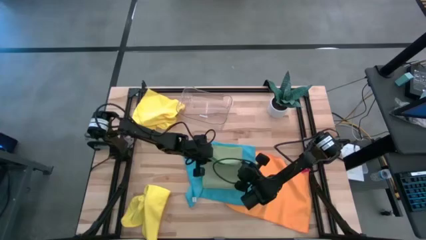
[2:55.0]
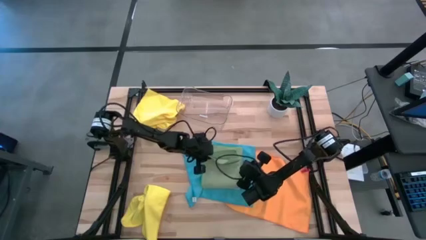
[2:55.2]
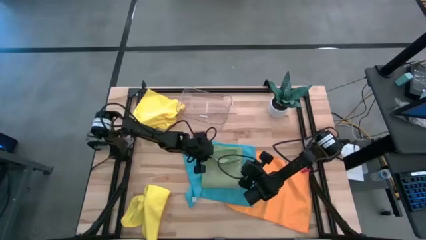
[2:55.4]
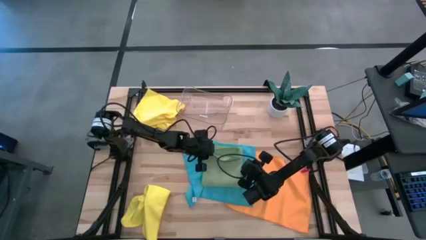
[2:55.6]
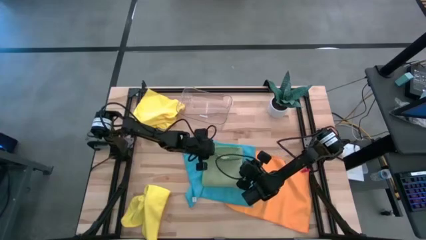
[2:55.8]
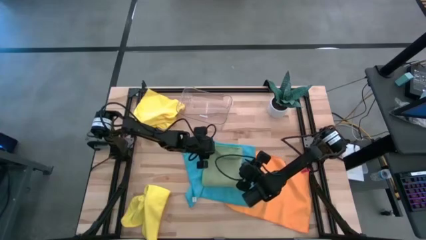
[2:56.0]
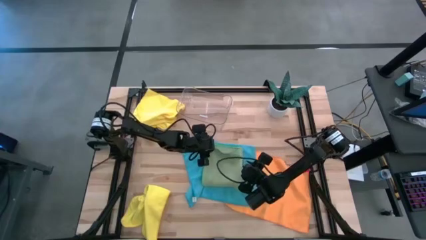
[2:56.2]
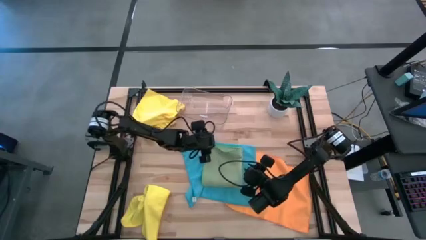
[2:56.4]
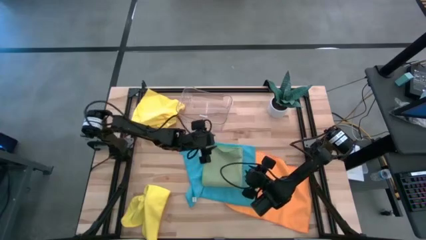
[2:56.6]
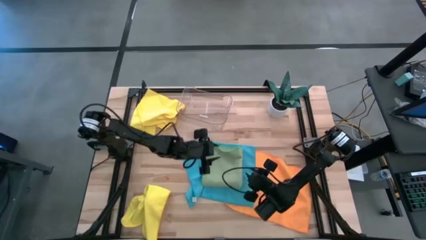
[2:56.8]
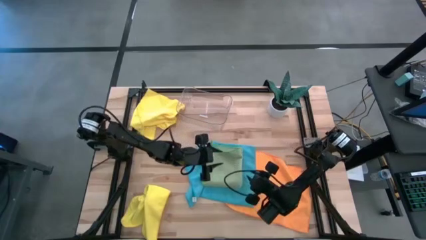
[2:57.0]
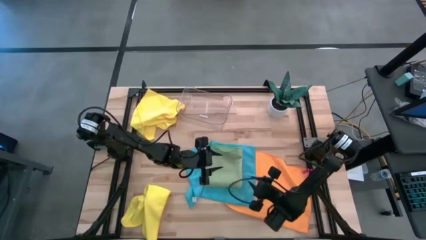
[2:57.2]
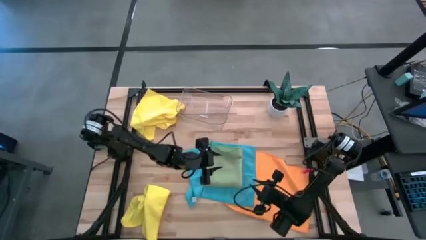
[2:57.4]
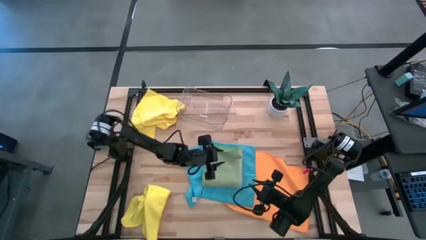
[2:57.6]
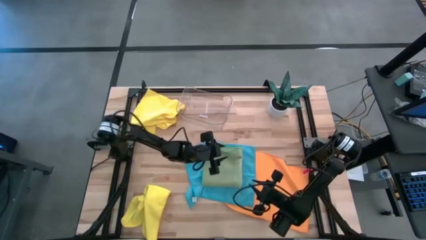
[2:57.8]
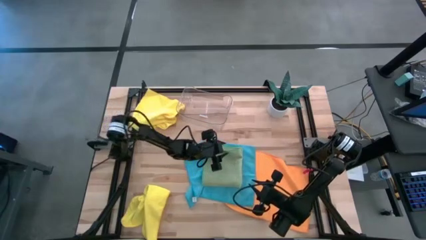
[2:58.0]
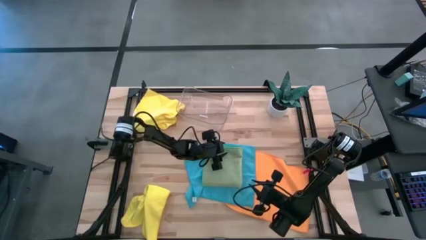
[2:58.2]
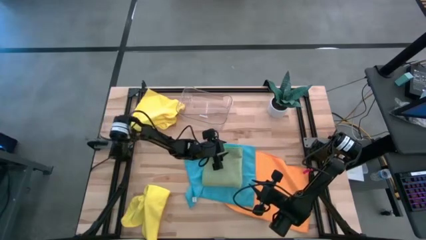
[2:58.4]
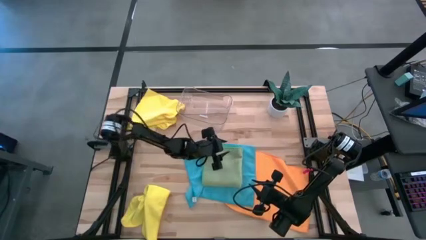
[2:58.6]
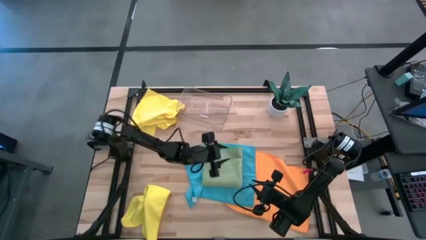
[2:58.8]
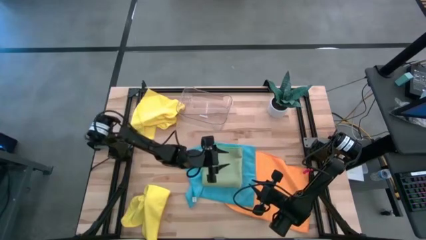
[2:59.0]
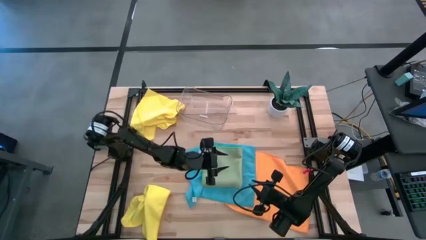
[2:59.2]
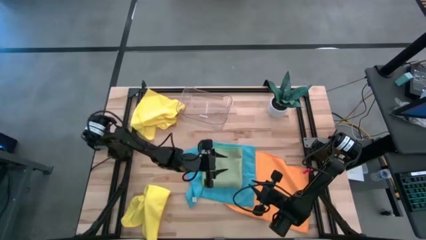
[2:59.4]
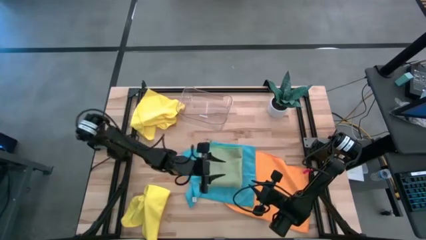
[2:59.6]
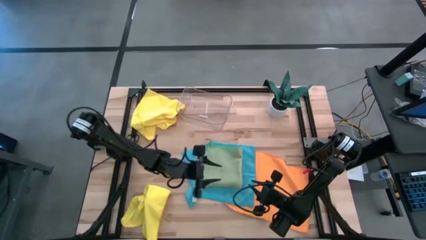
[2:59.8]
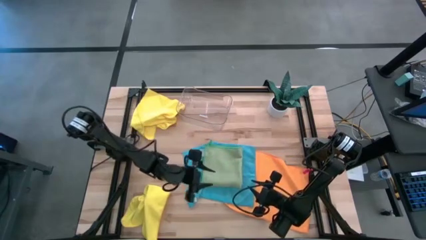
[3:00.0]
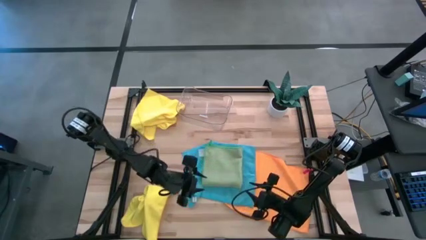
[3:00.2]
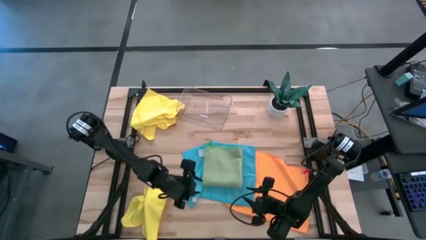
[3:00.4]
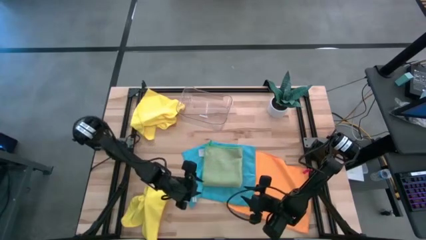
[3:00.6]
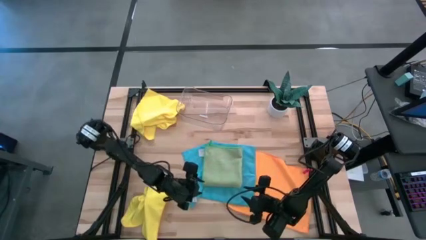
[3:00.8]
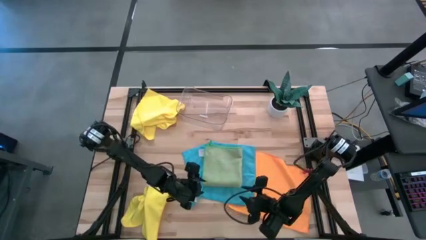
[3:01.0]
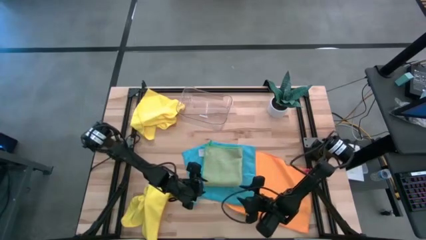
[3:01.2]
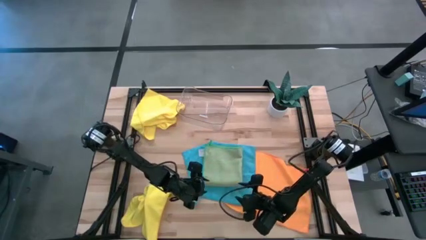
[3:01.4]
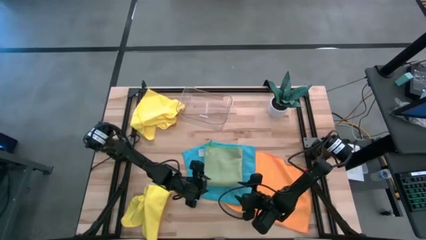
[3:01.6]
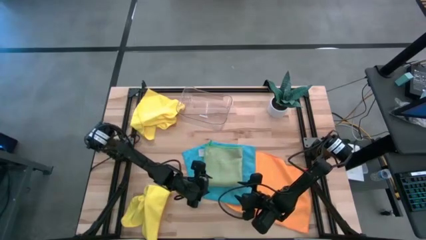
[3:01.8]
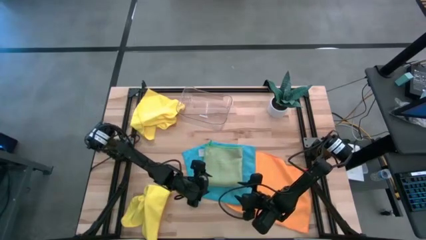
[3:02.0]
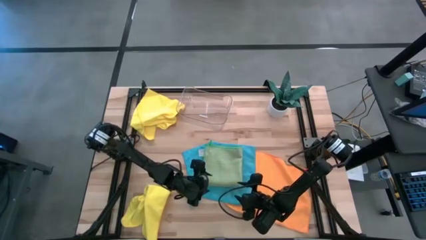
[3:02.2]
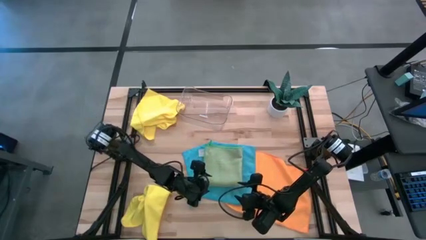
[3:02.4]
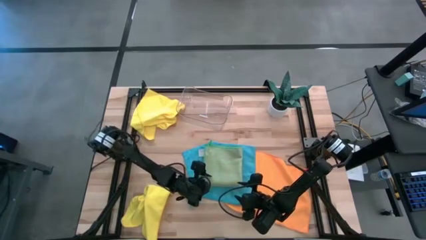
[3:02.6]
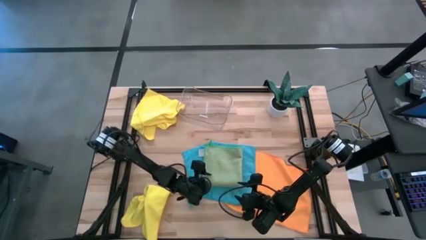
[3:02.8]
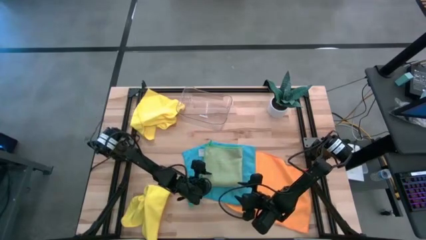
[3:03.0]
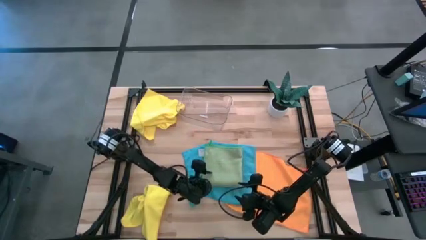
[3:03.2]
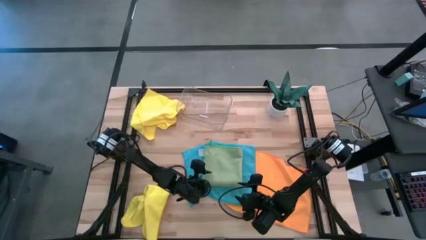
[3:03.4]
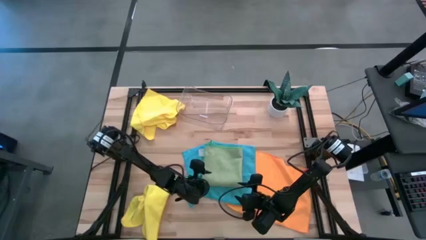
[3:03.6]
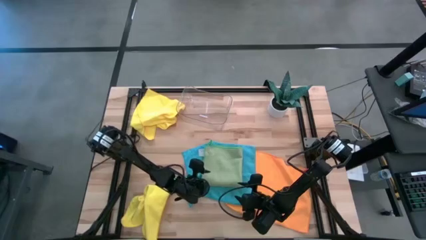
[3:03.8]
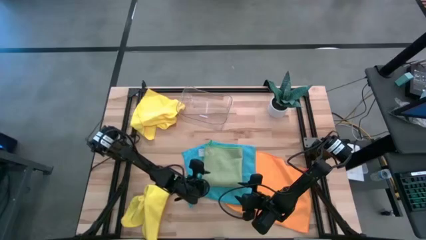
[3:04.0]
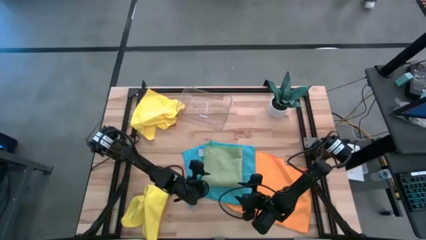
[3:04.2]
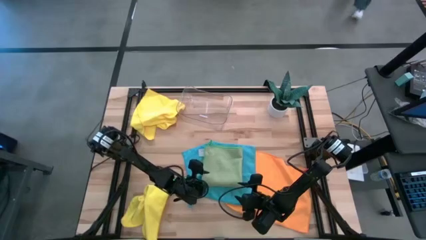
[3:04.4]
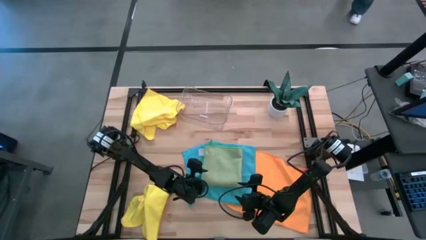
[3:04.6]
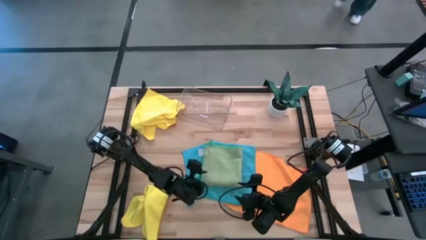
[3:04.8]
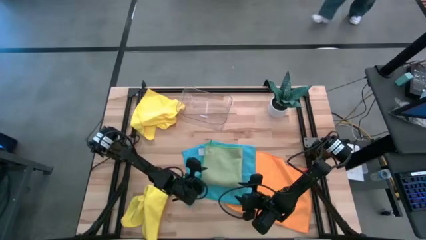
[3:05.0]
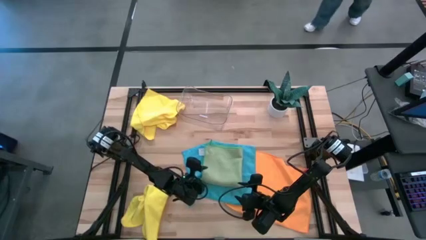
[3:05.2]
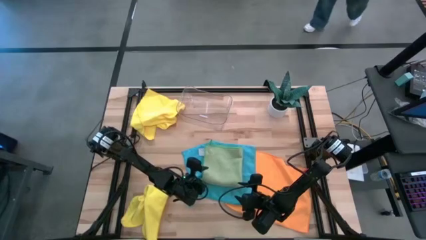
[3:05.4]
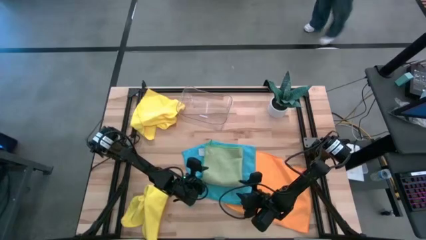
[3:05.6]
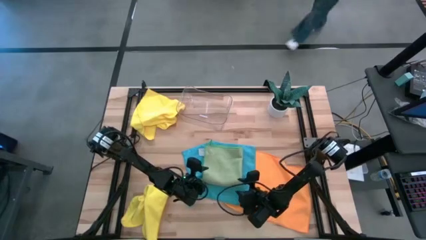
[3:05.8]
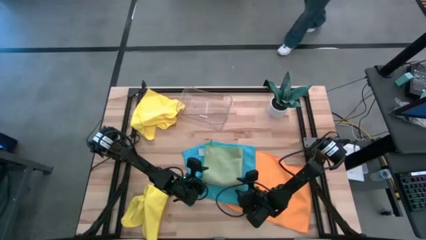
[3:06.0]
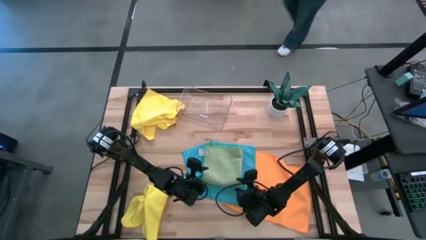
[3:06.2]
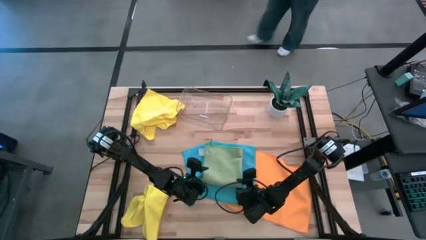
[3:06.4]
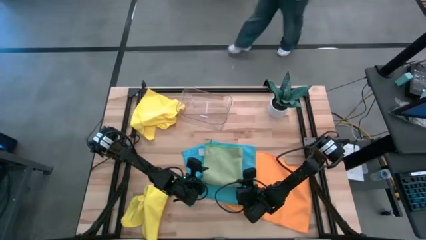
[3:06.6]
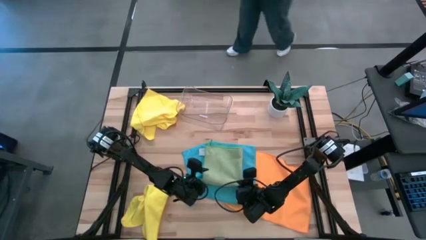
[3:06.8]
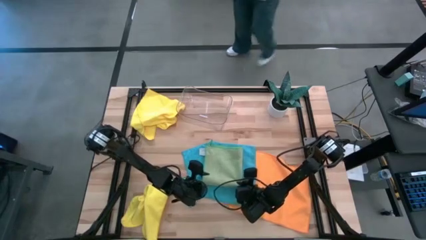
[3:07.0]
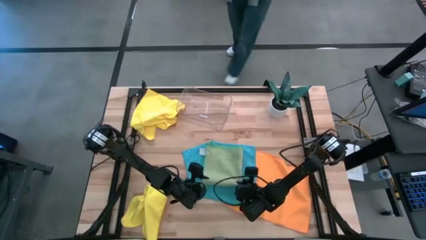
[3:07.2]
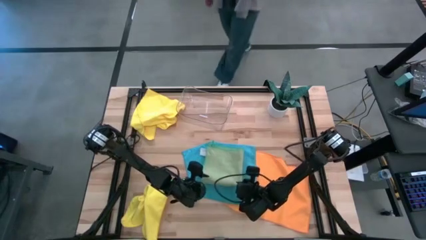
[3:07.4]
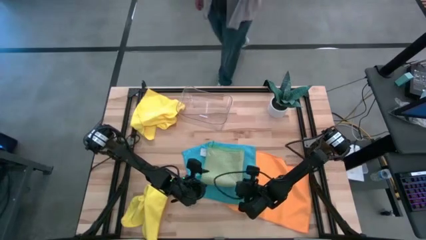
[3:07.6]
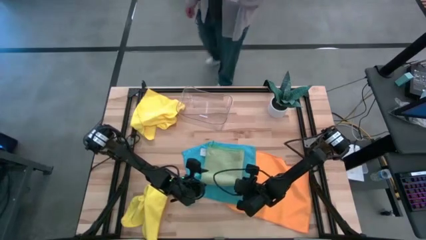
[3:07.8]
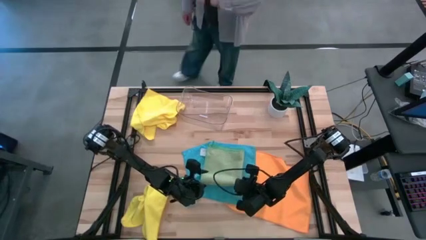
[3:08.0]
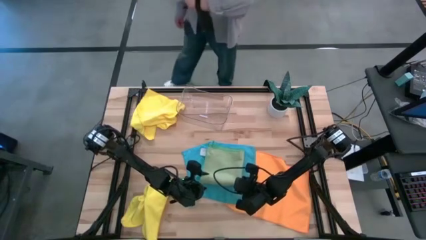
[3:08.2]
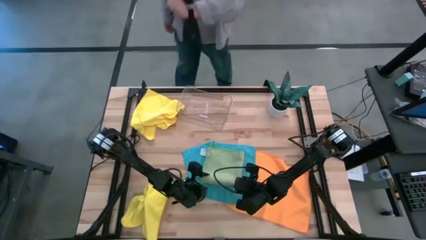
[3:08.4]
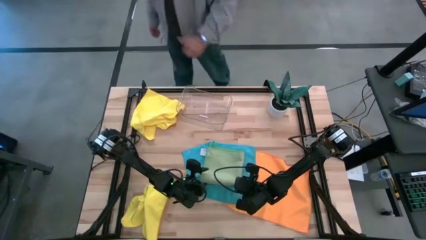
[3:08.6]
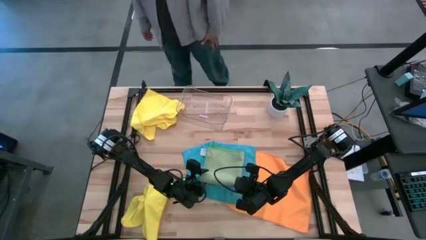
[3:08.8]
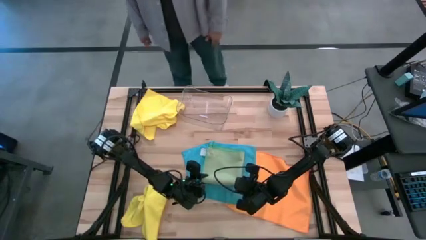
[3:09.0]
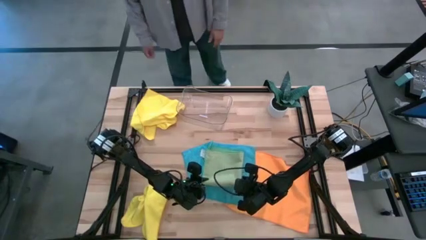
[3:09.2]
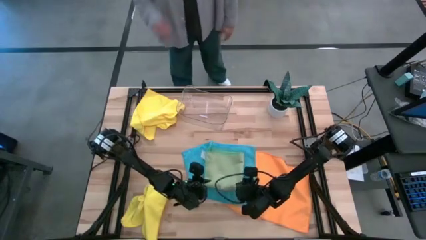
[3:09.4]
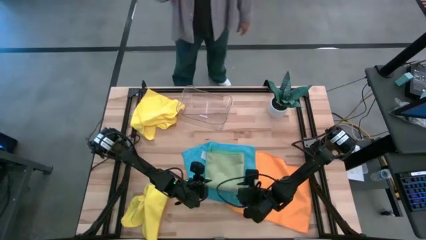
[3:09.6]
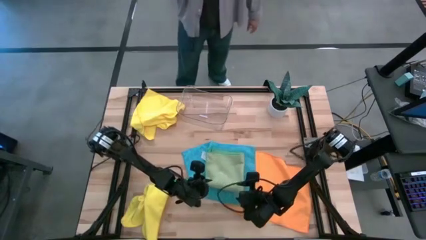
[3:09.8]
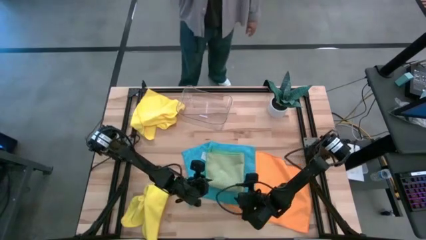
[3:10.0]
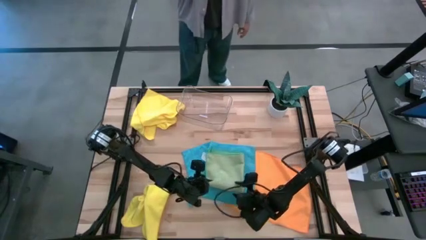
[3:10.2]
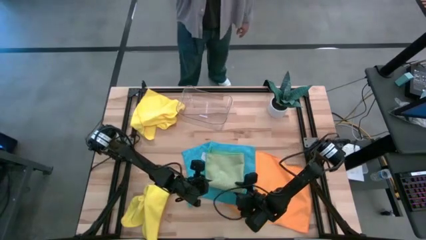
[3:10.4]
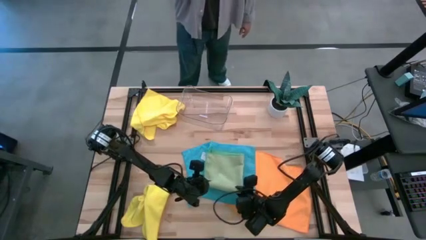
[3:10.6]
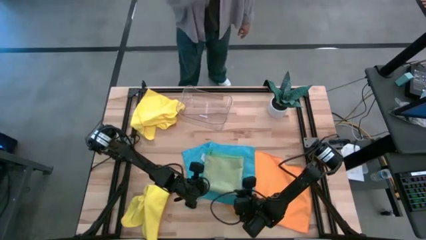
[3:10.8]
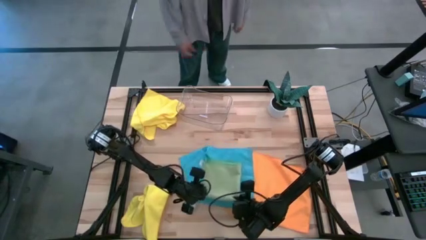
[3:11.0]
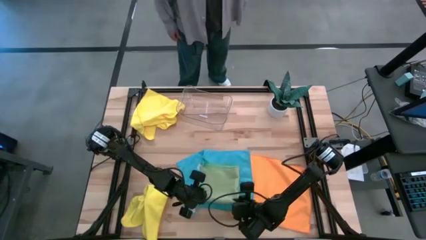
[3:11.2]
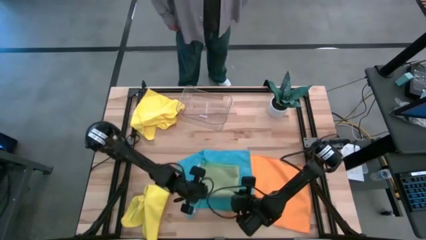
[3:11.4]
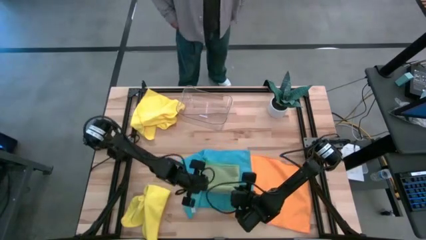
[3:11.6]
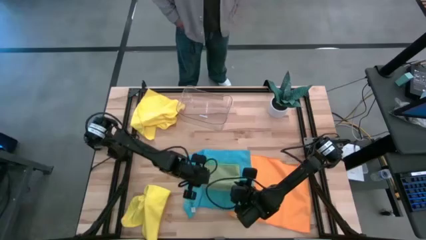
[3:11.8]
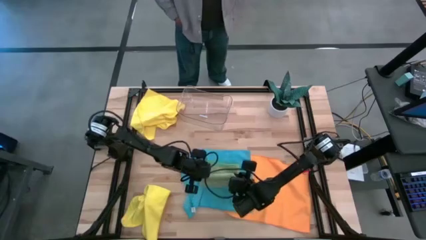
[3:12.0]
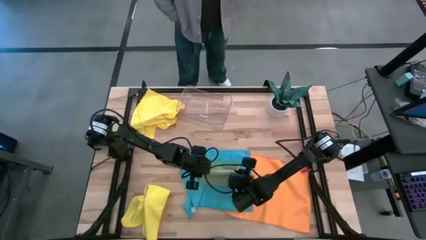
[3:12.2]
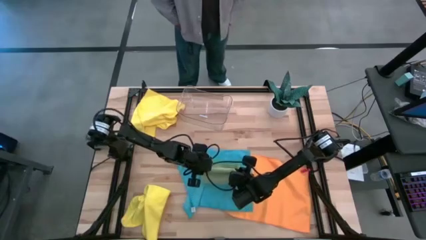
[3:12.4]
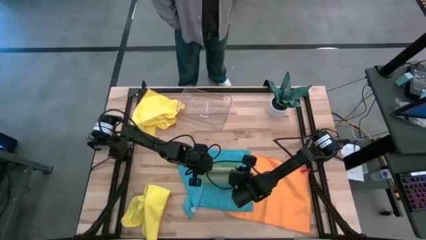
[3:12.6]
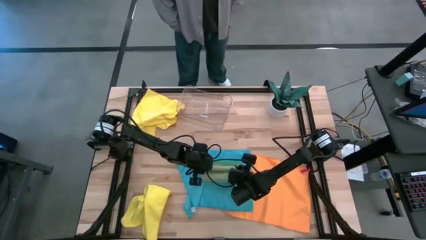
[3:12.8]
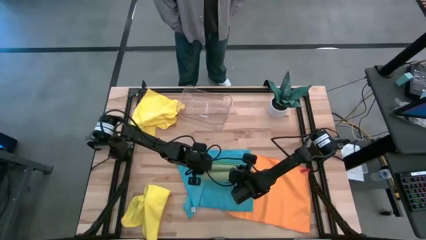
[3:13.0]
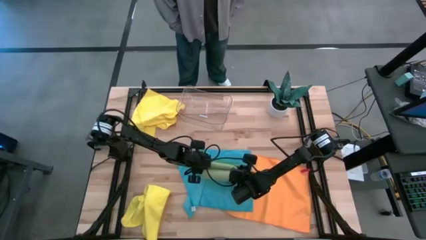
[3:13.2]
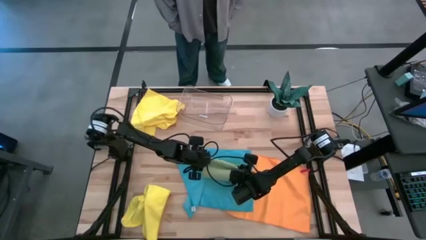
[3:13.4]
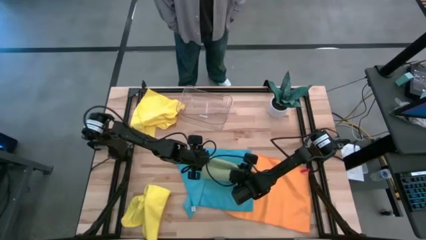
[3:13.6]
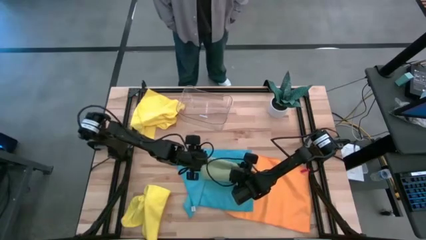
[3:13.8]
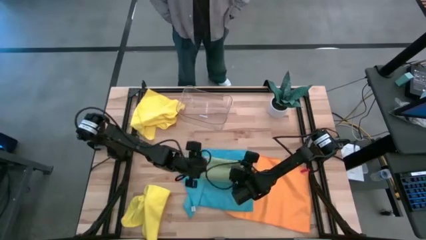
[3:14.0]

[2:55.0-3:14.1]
Task: Fold microfiber towels
Fold the green towel
